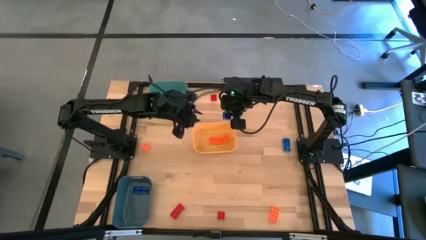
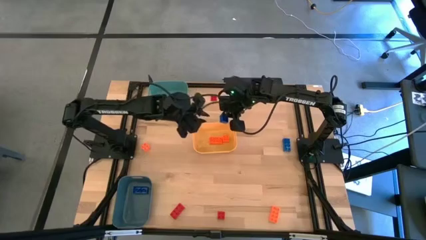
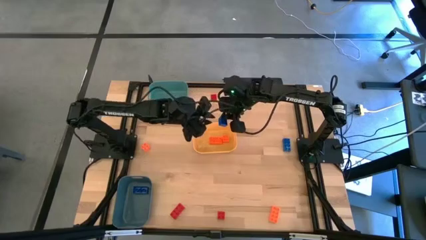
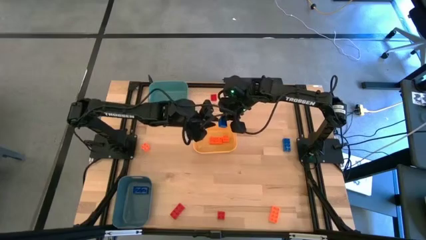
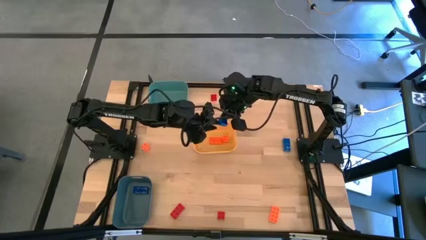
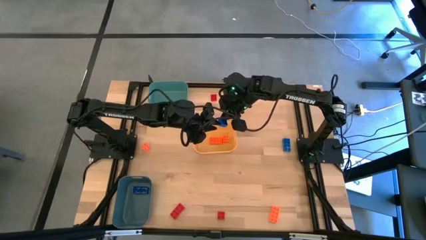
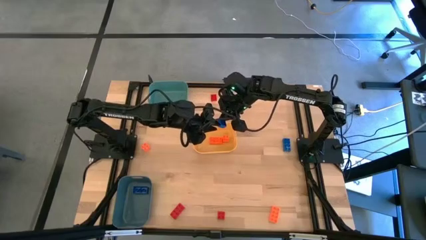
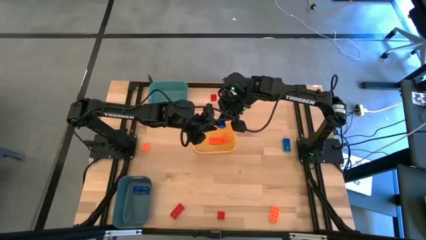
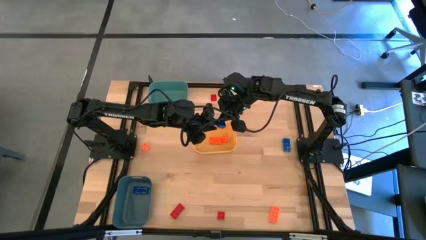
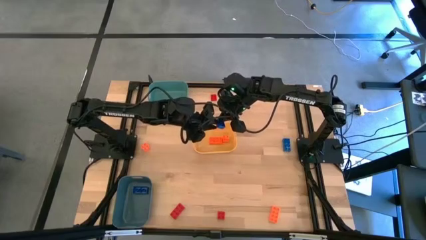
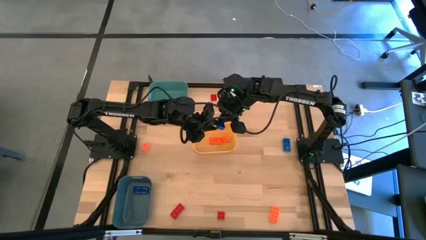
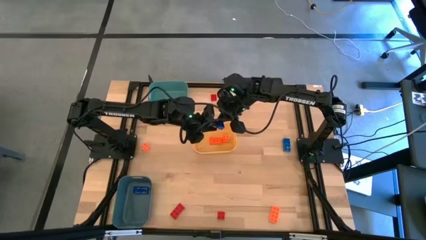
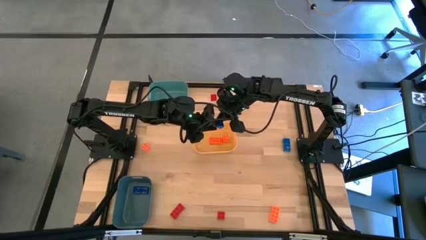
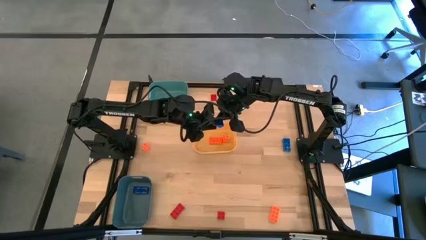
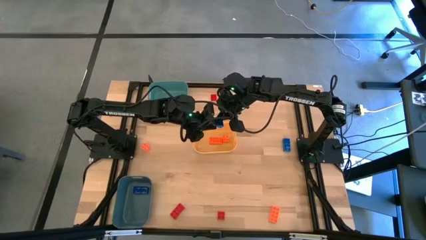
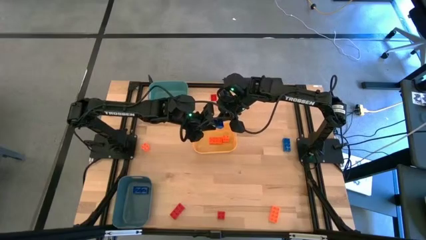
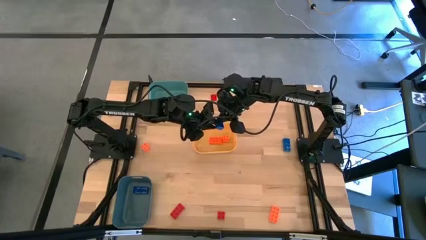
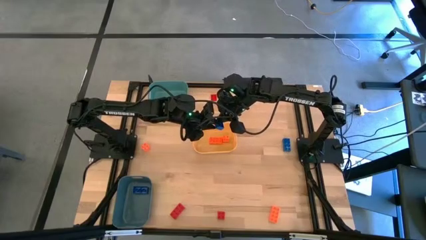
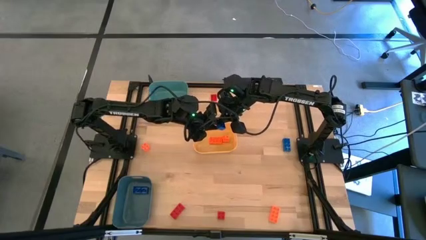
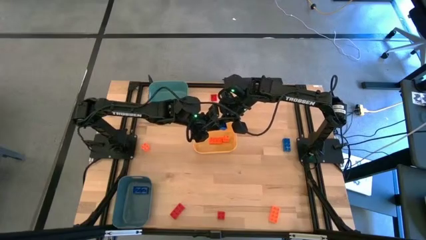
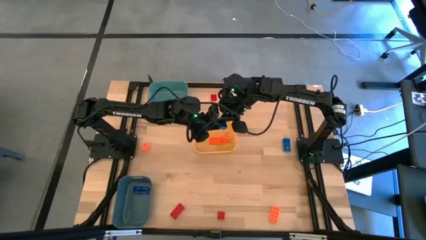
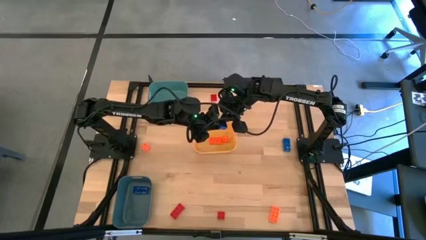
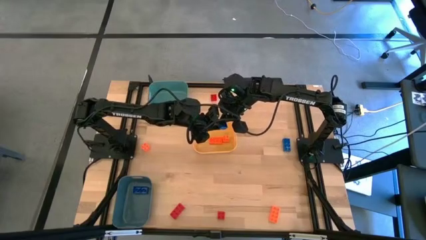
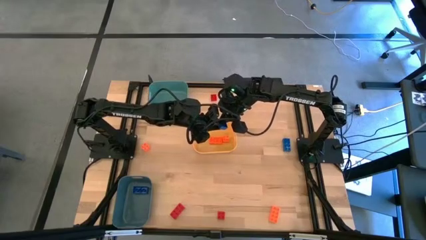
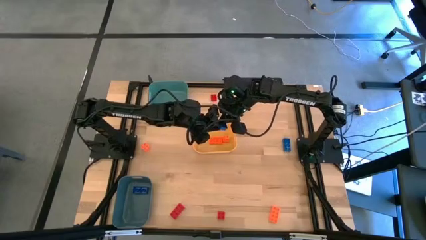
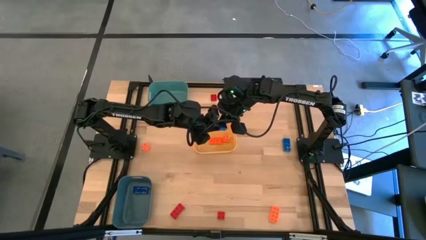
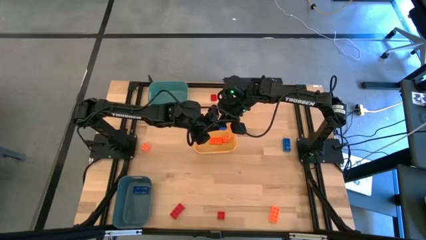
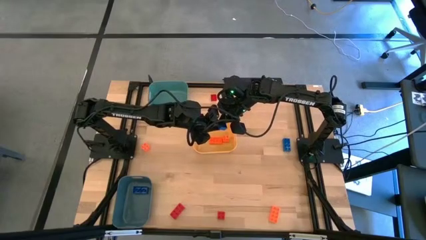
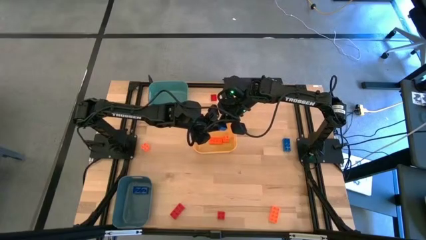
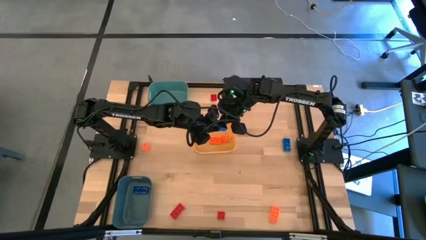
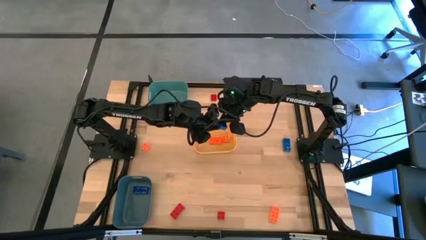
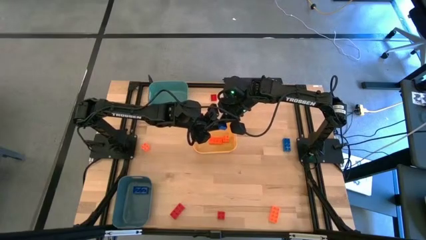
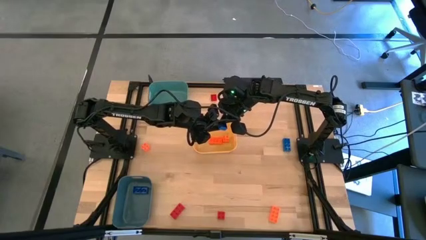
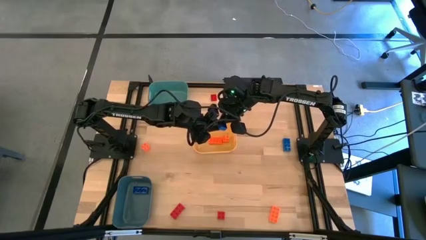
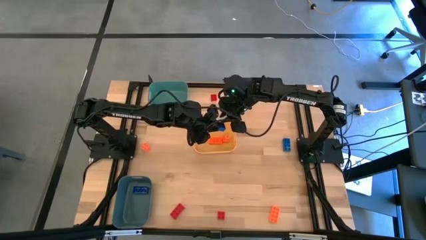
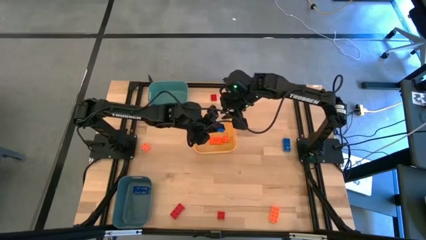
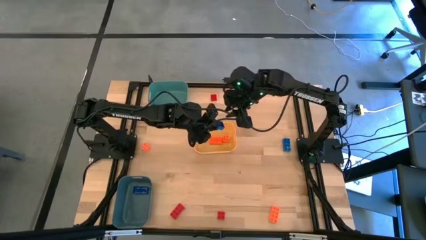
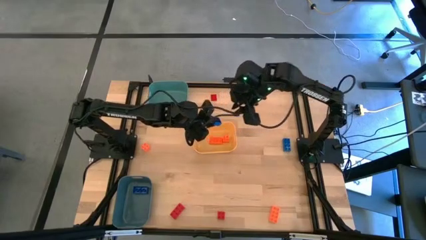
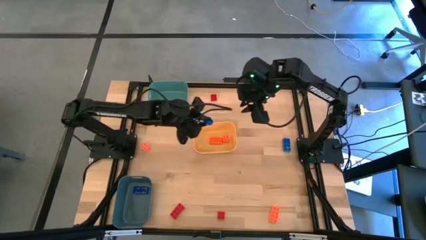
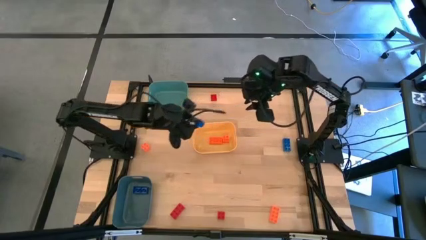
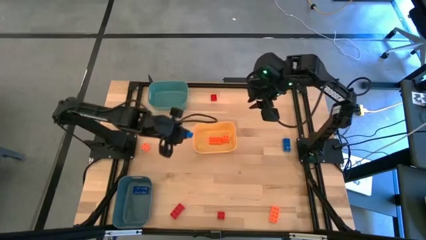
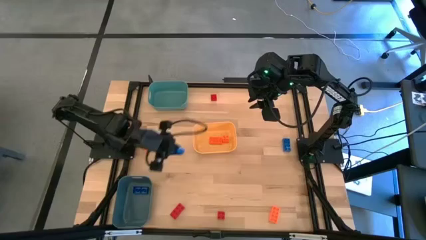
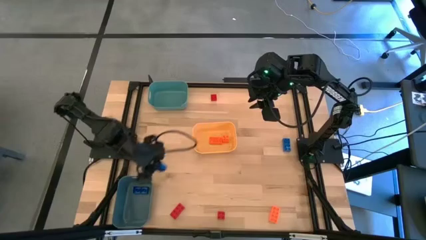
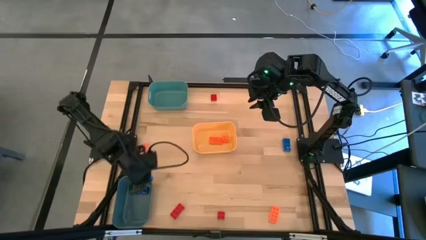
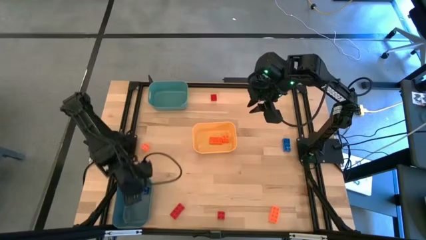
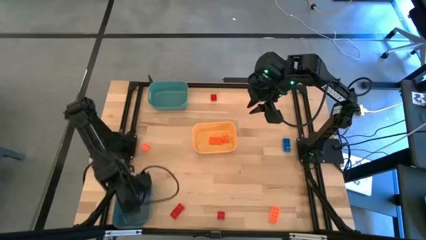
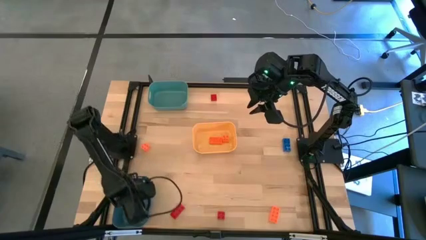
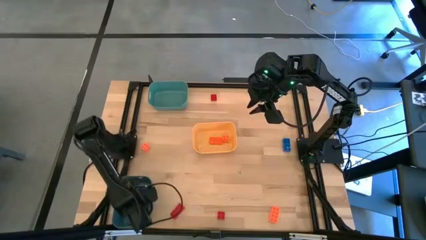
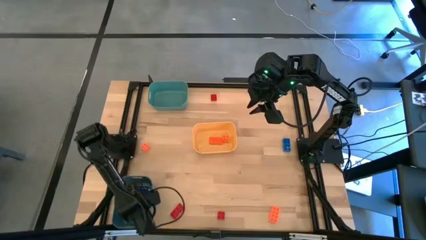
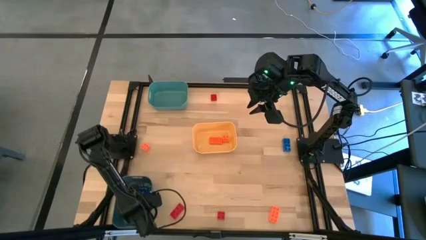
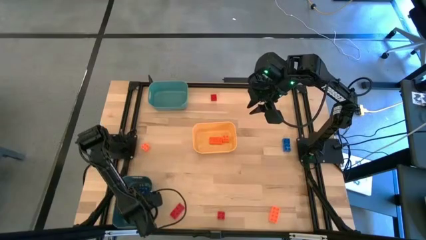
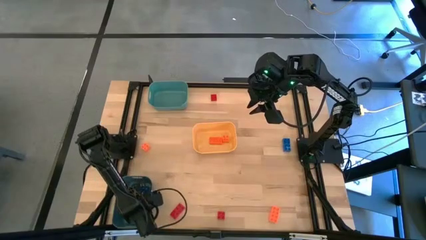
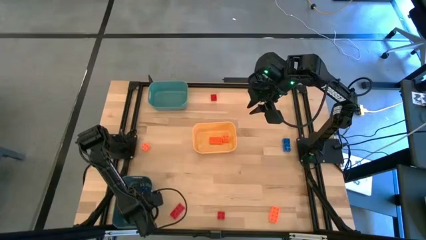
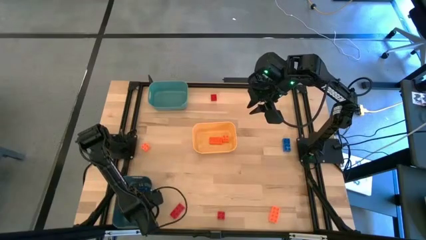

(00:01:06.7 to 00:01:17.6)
Task: Sort & place blocks by color
Put the top blue 4 stud game piece into the blue bin

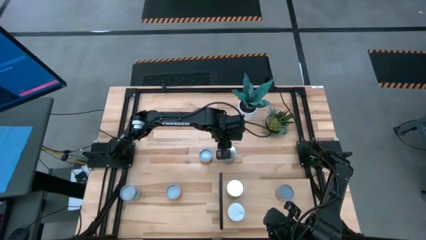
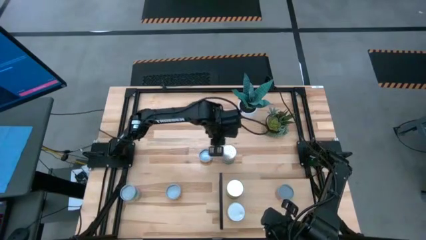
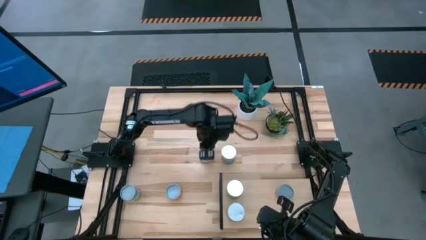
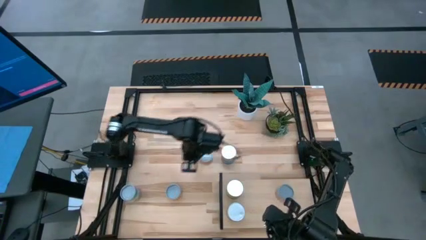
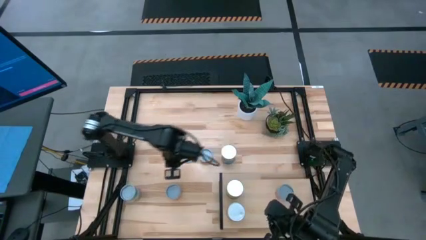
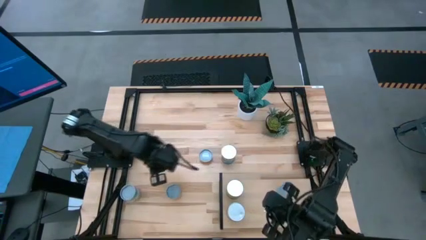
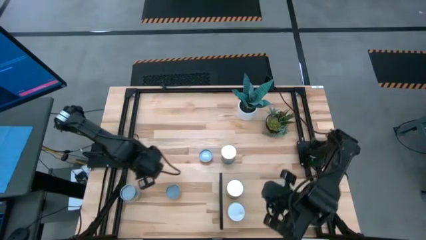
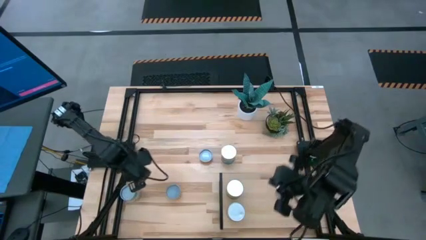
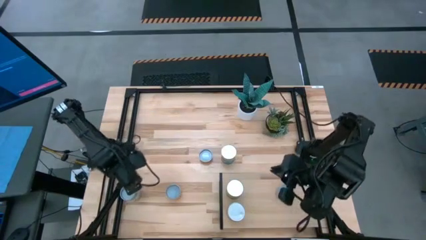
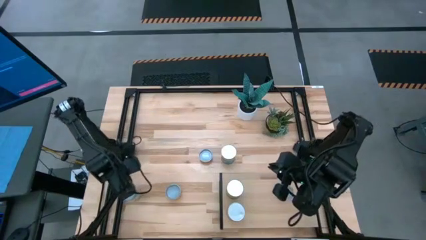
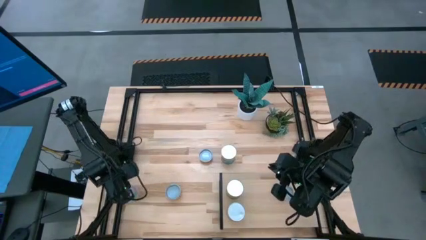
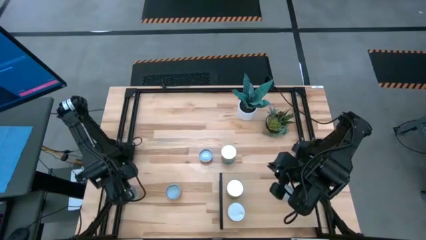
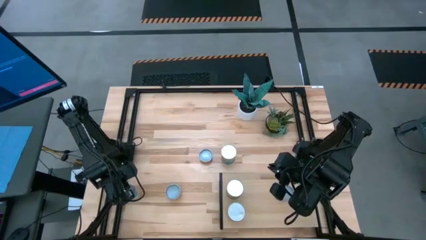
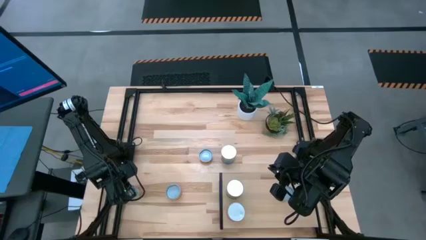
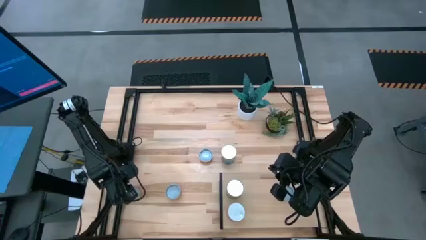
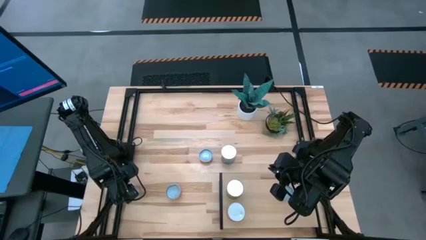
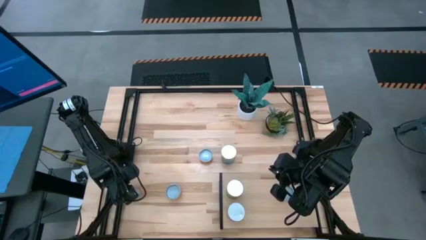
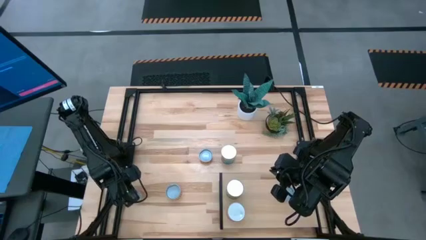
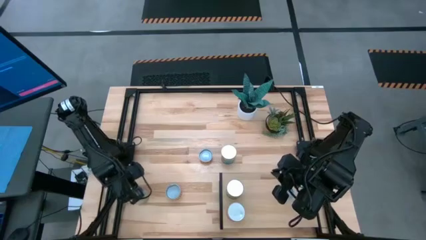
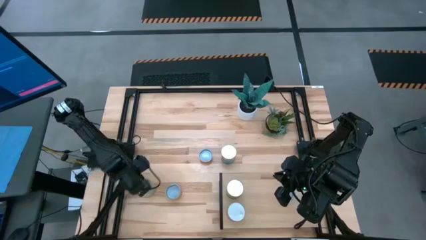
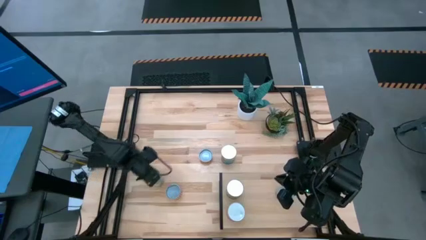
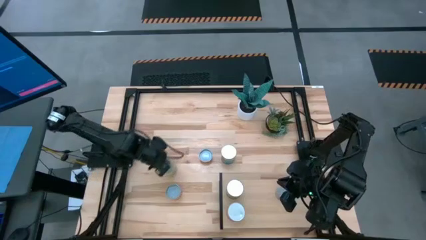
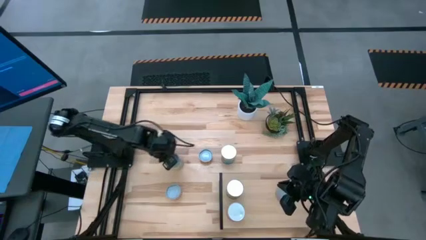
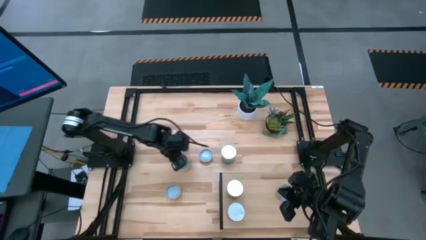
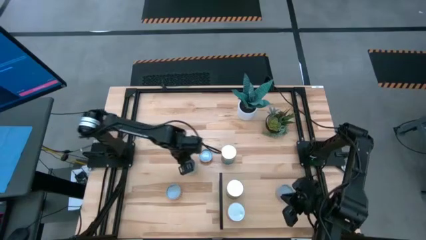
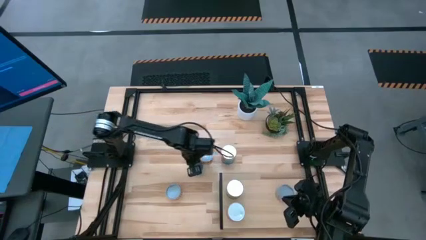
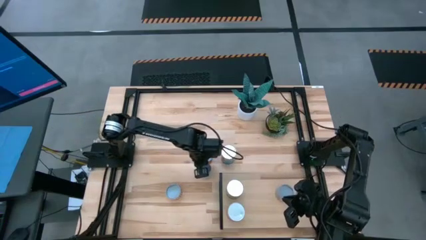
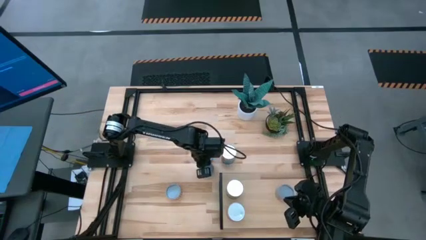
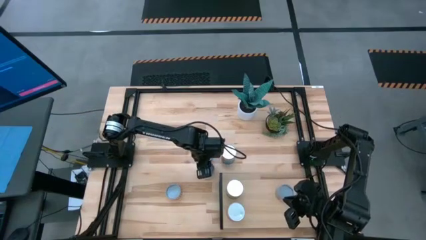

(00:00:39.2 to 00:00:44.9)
Task: Pick and place cans onto a shelf
Move the canned chicken soup from bottom left to the center of the table
